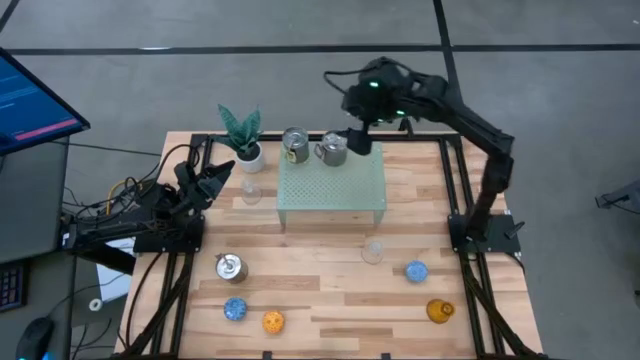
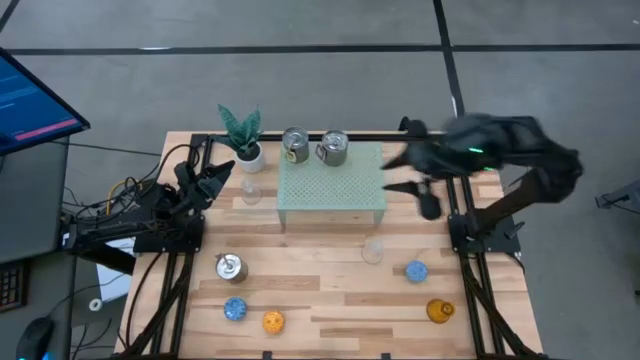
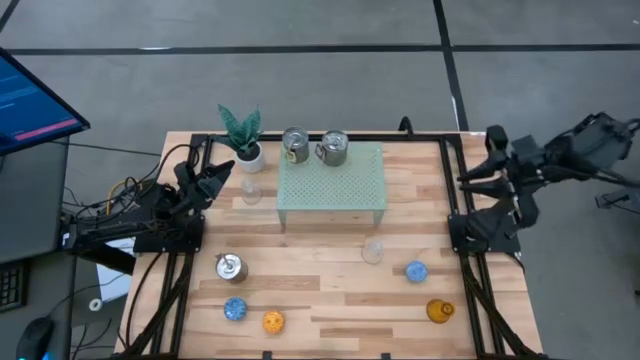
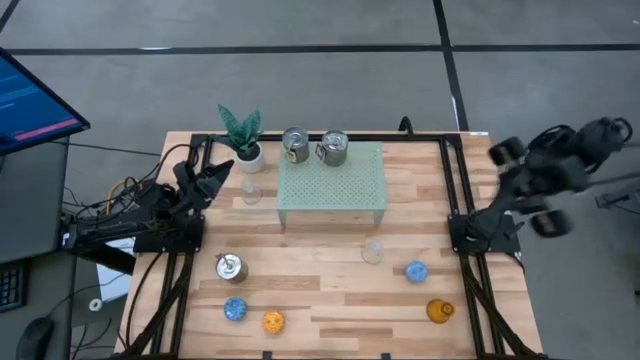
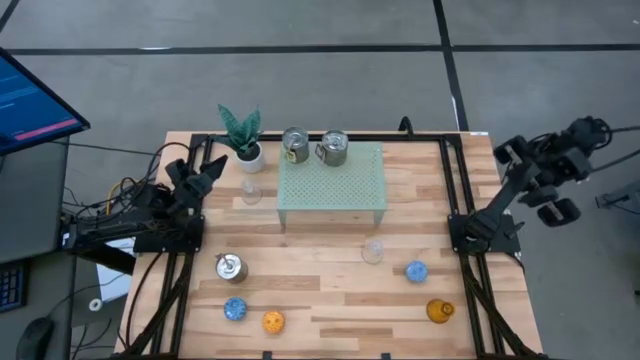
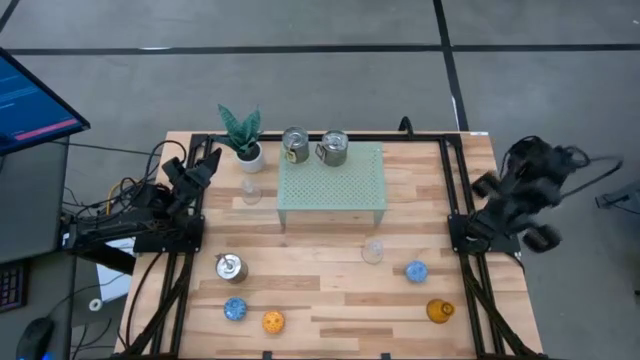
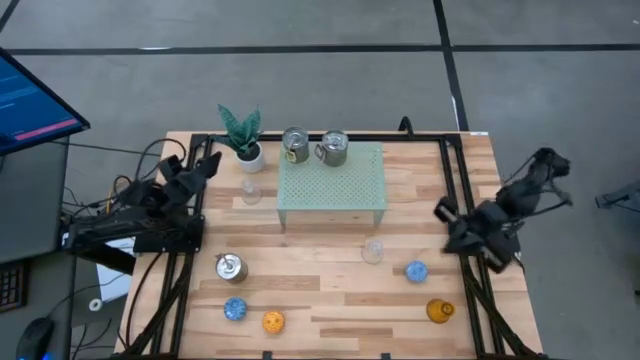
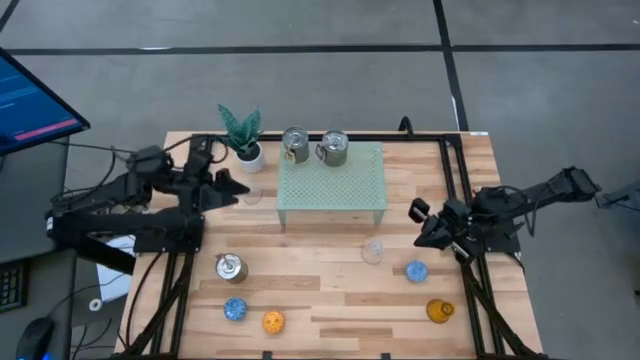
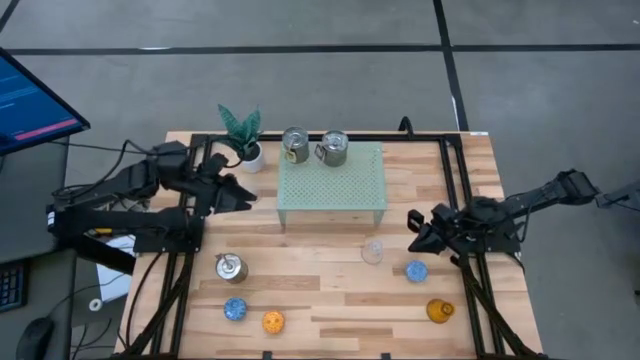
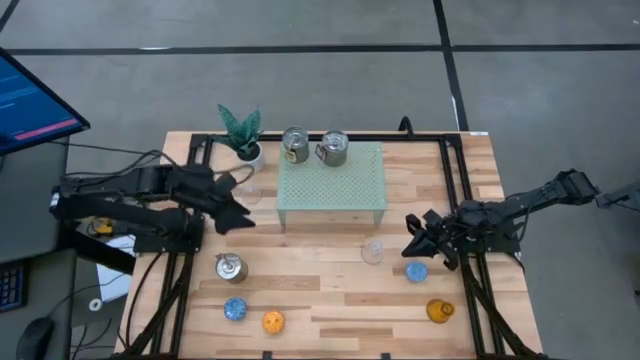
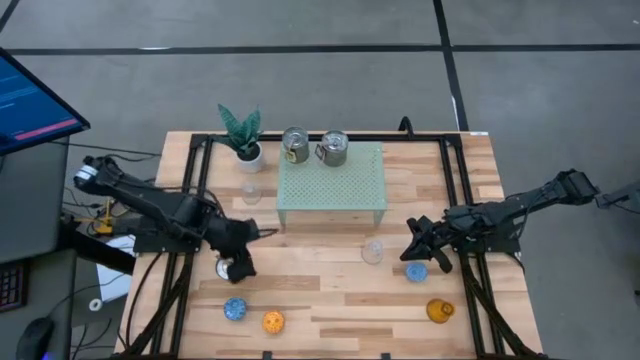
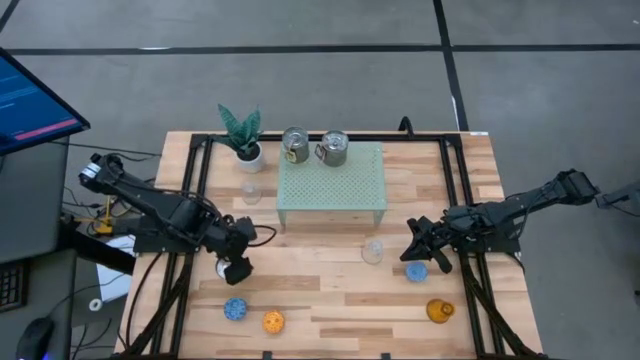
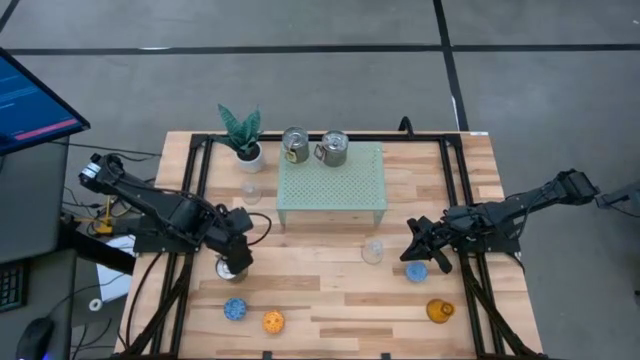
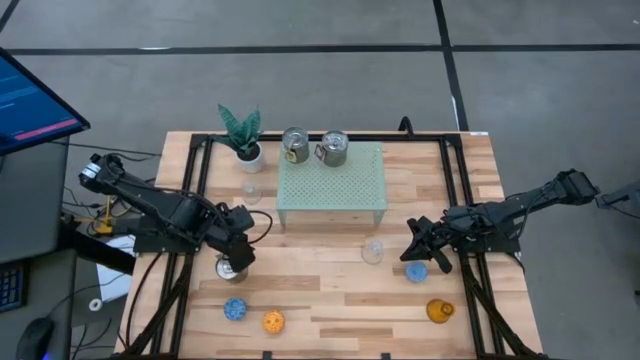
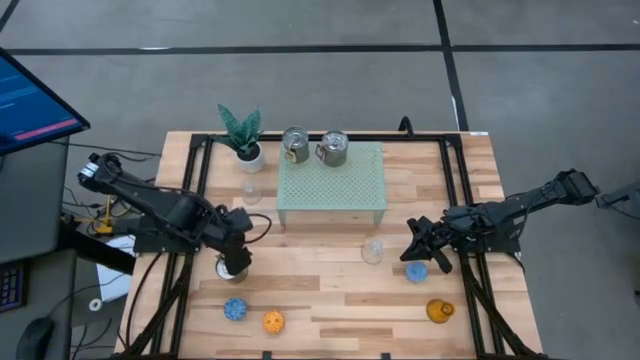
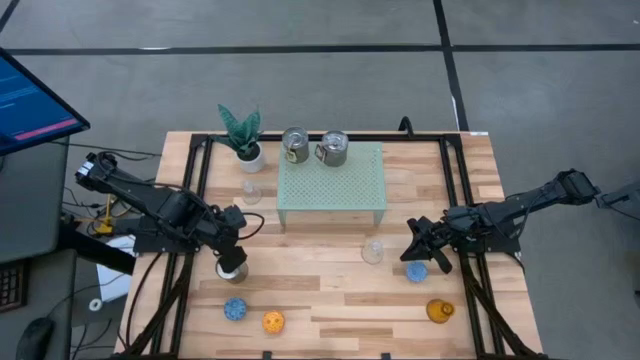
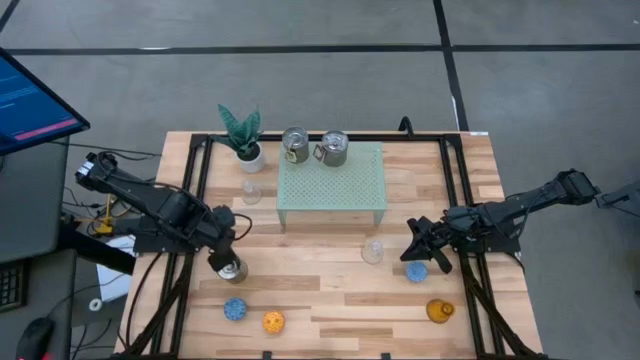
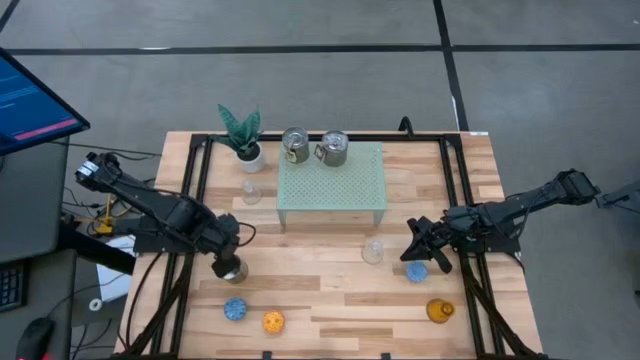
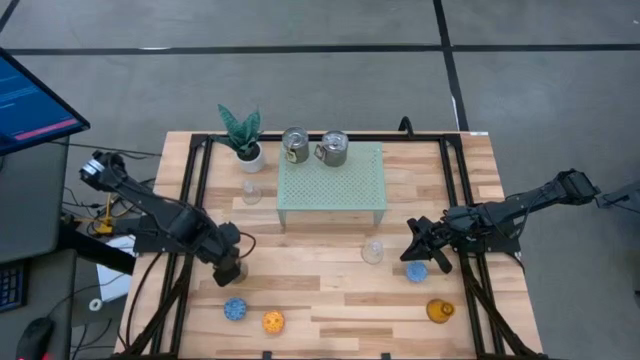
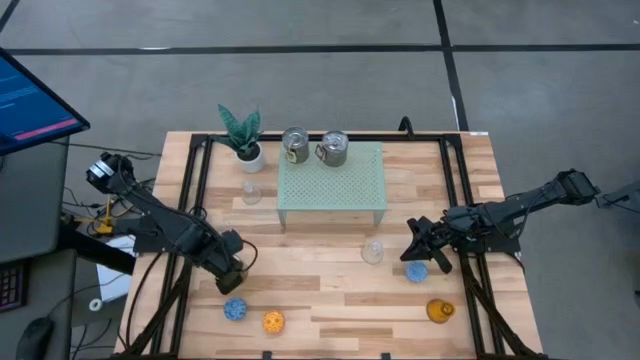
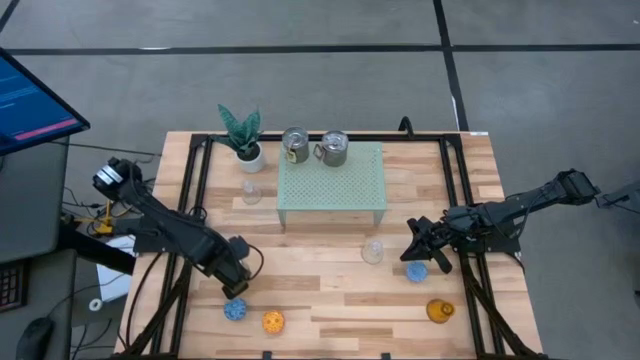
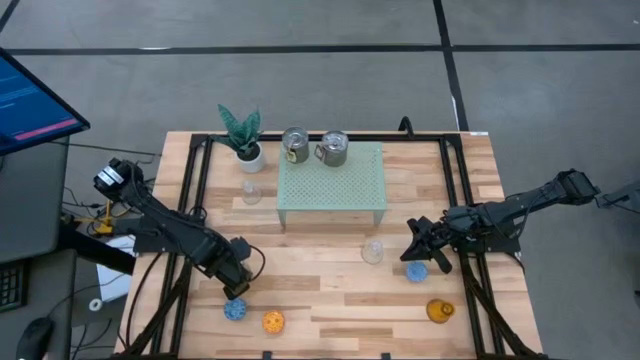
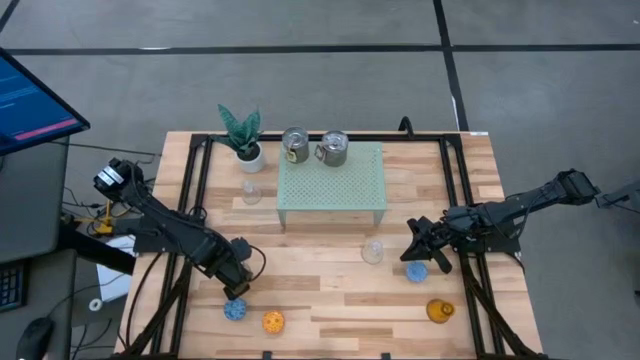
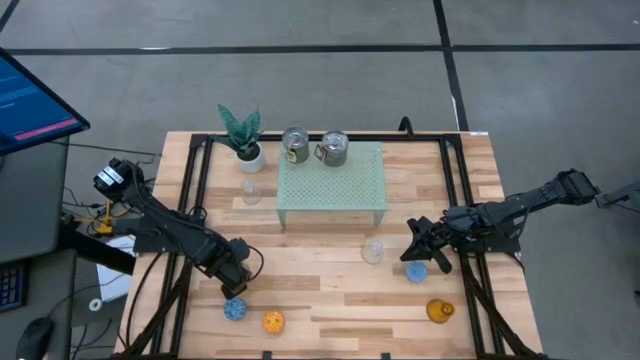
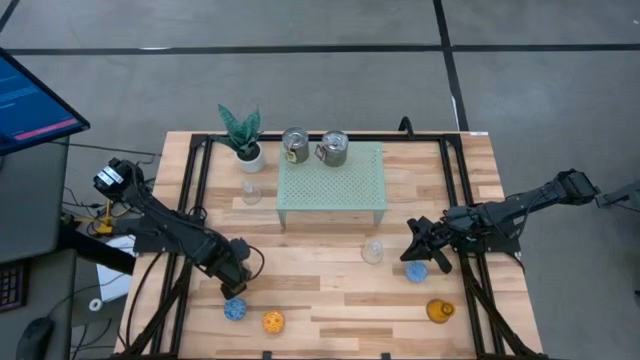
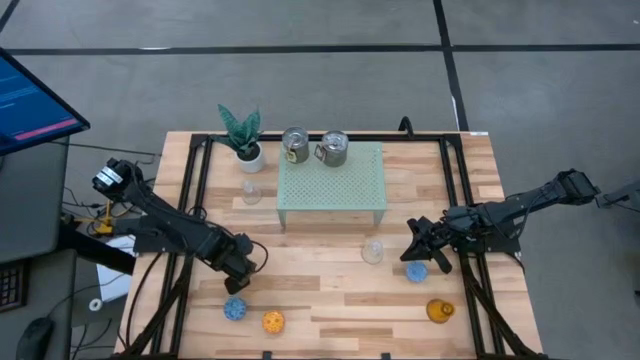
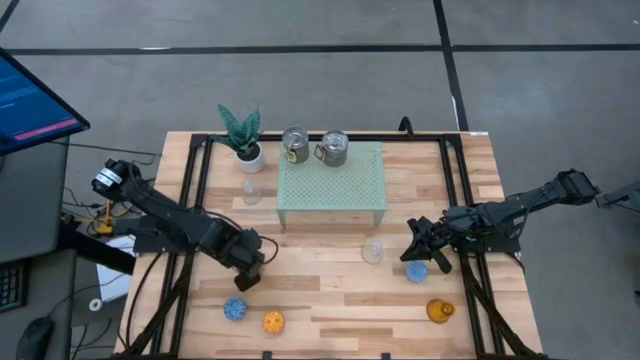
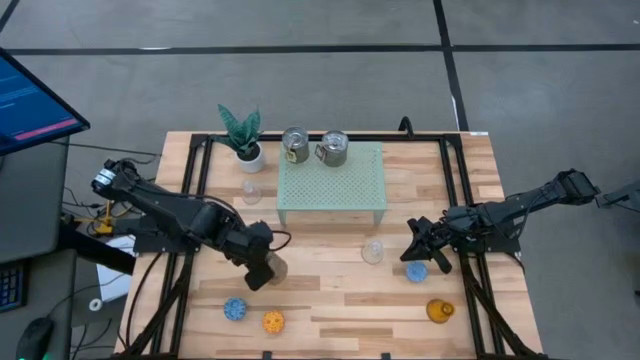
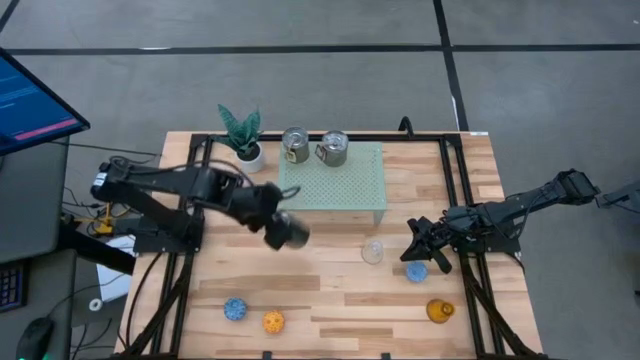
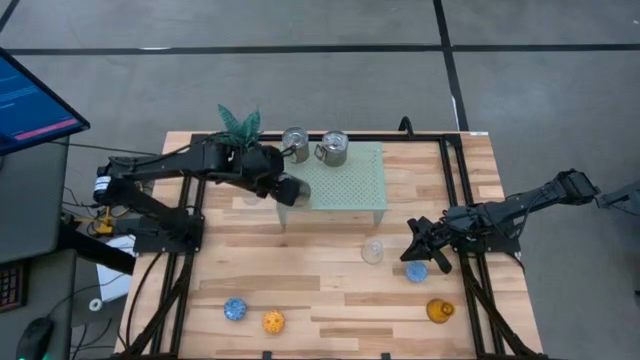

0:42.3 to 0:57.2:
Task: Pick & Place candle stick holders
Put the silver scented candle can on the shelf

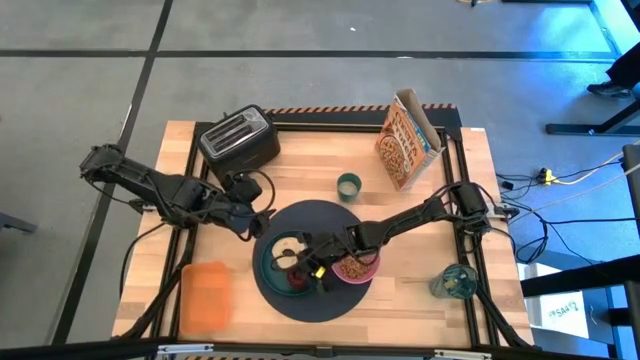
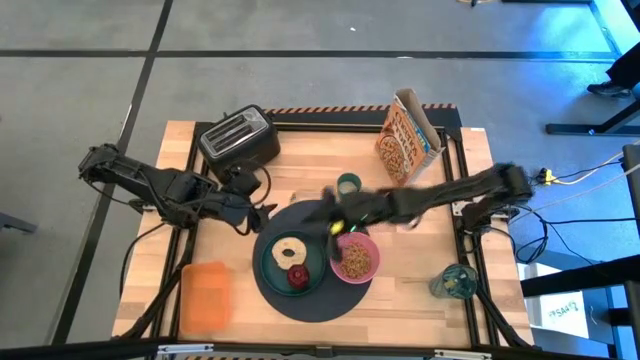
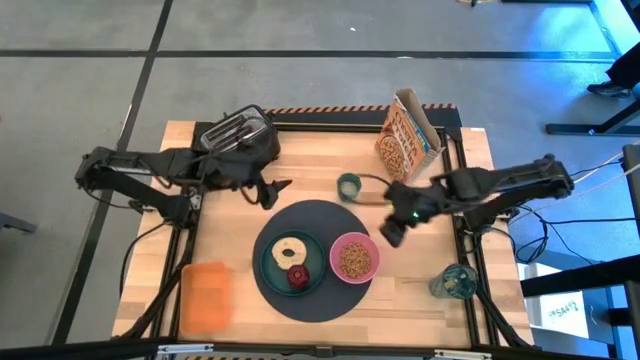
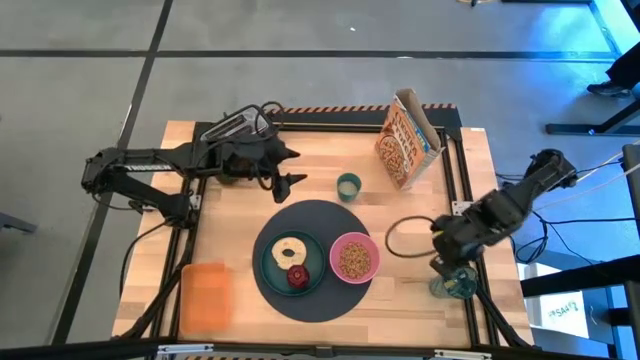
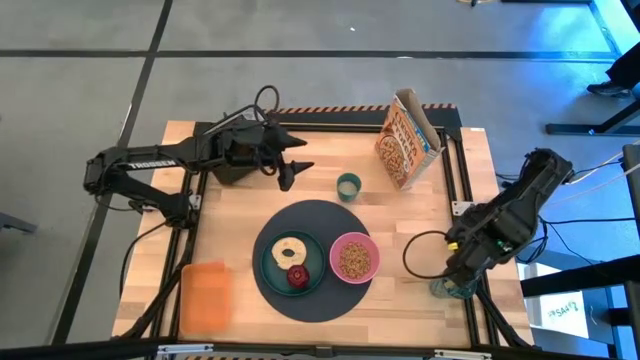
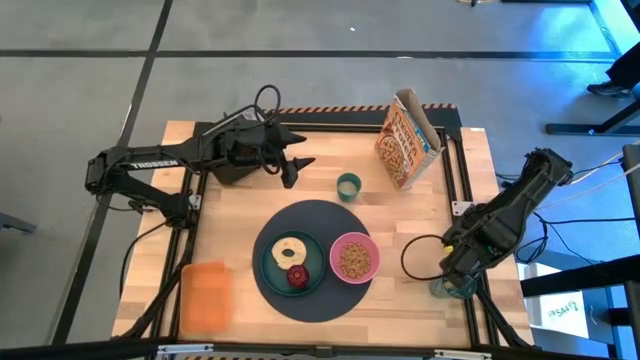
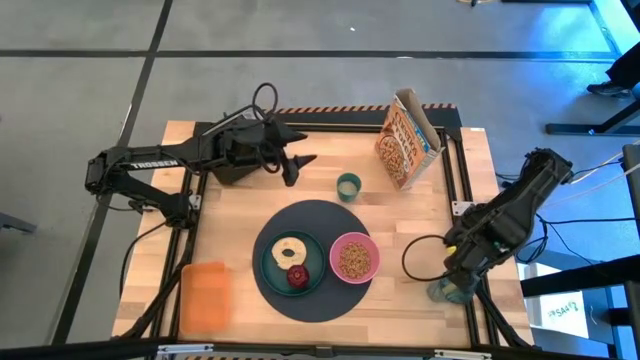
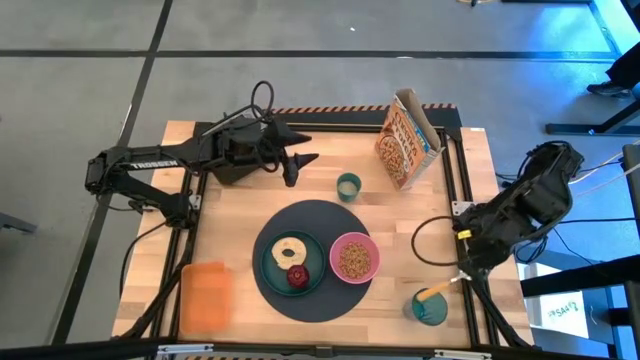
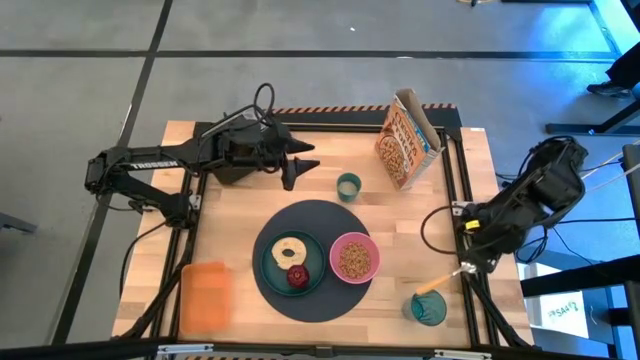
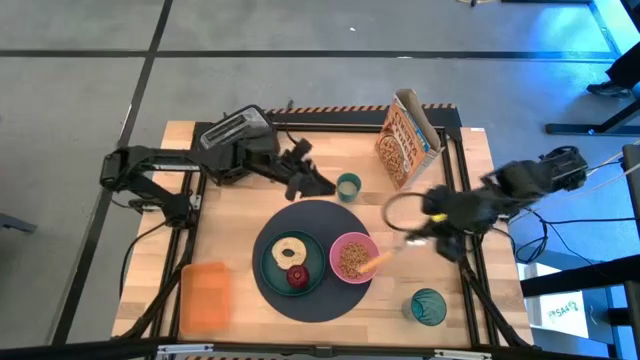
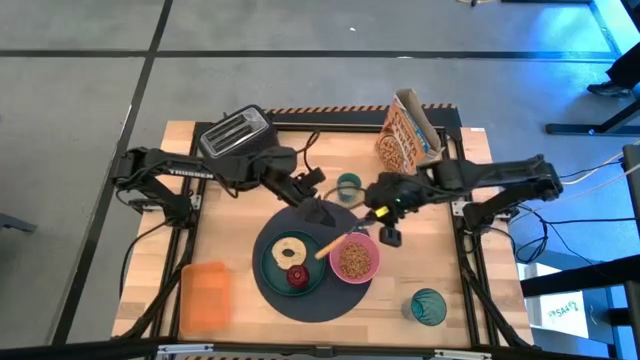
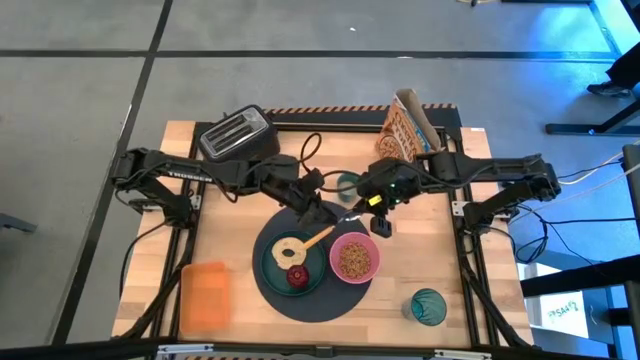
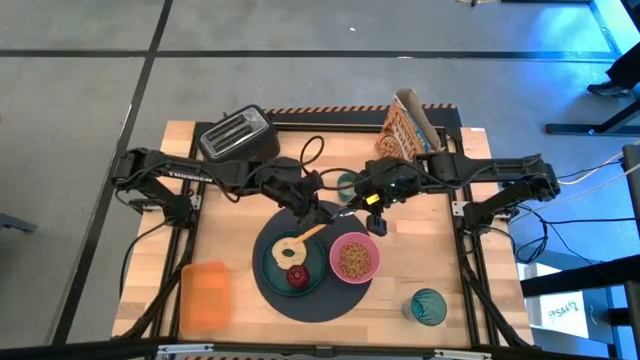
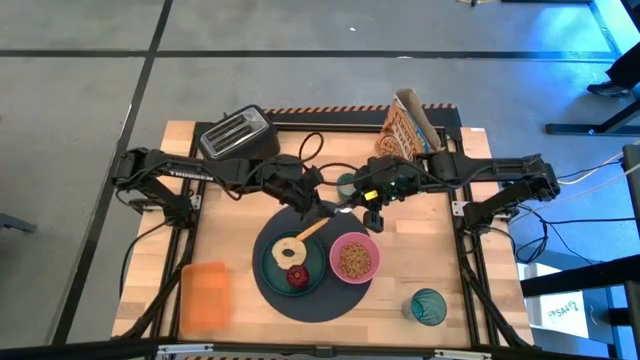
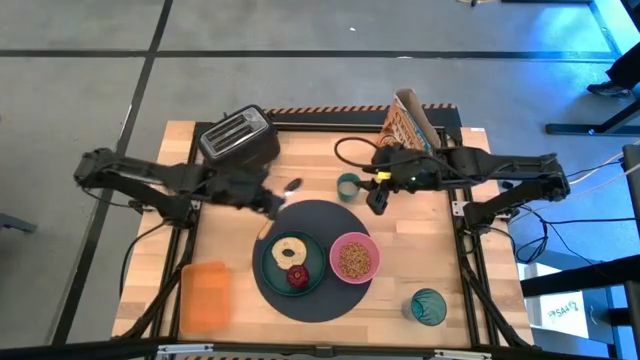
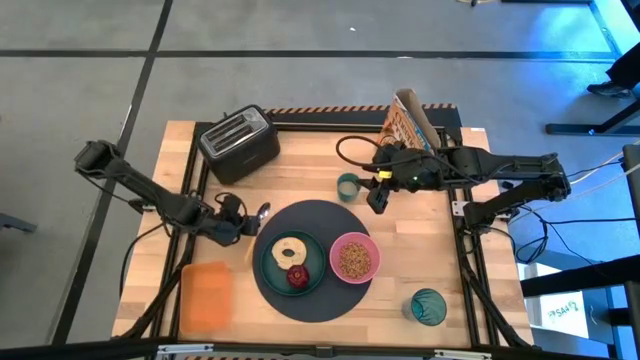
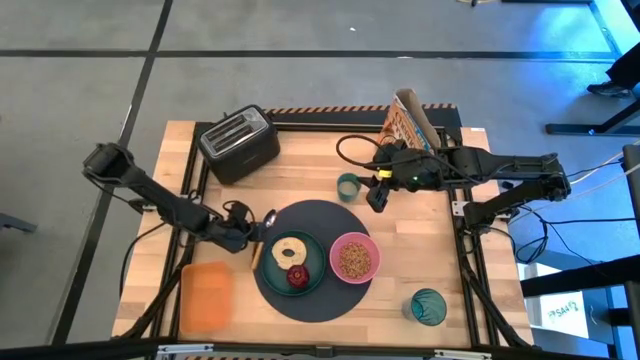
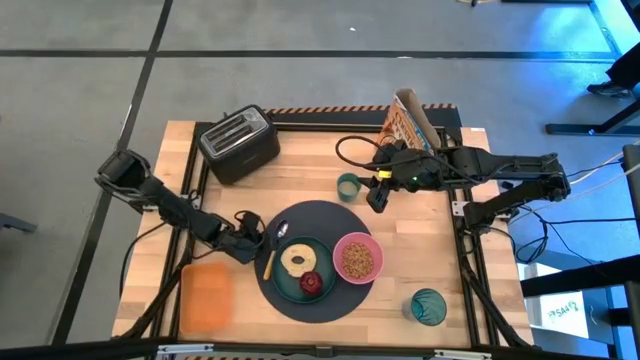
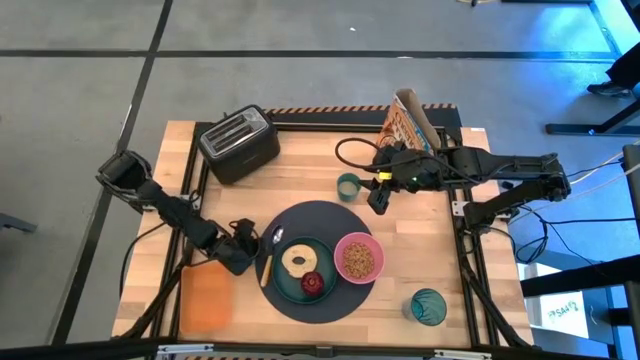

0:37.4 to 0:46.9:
Task: Arrange a breakfast setting
Put the yellow spoon to the left side of the green plate on the placemat
